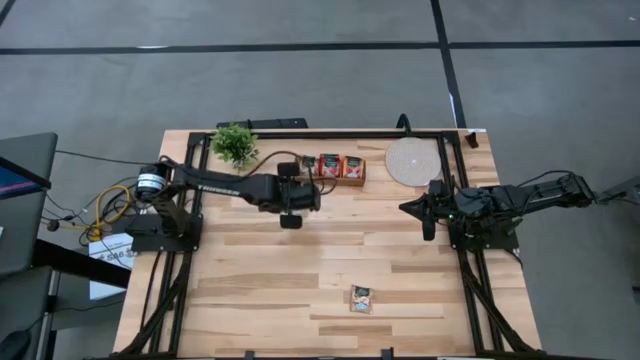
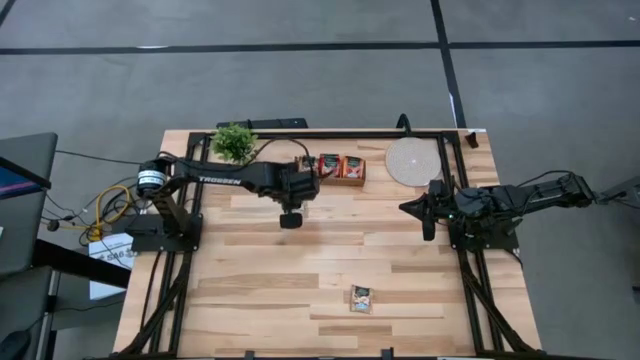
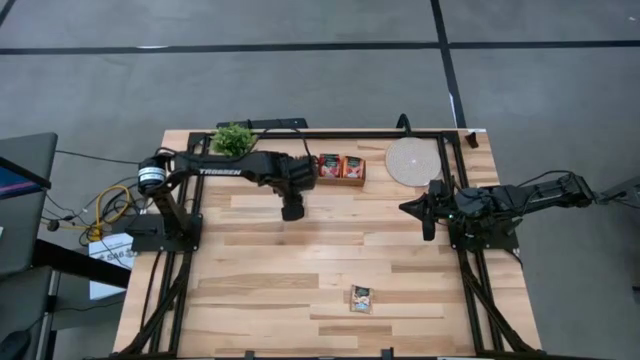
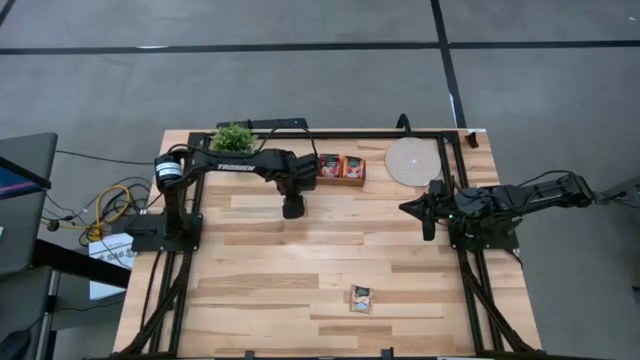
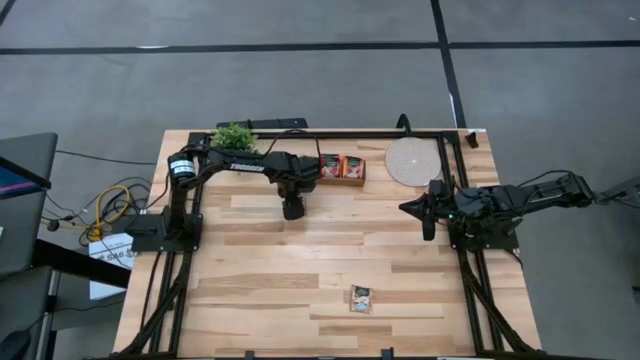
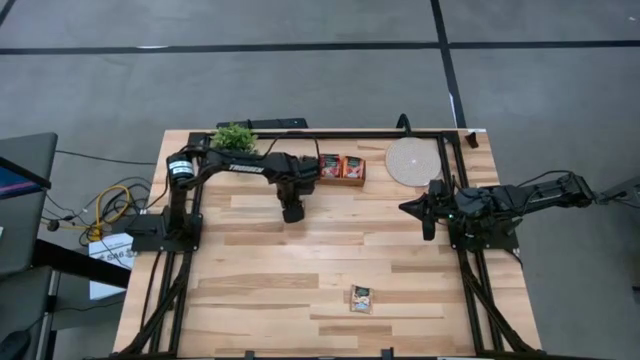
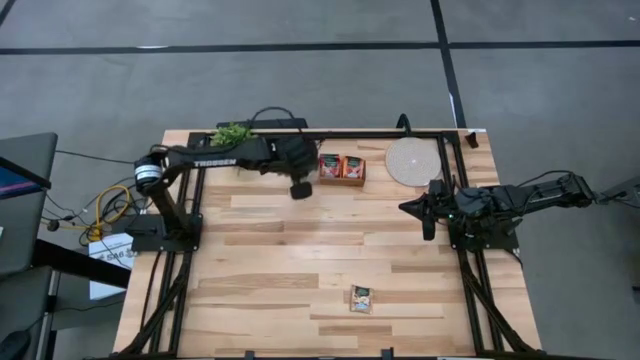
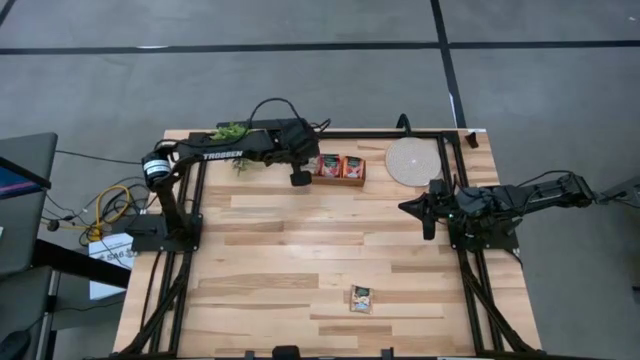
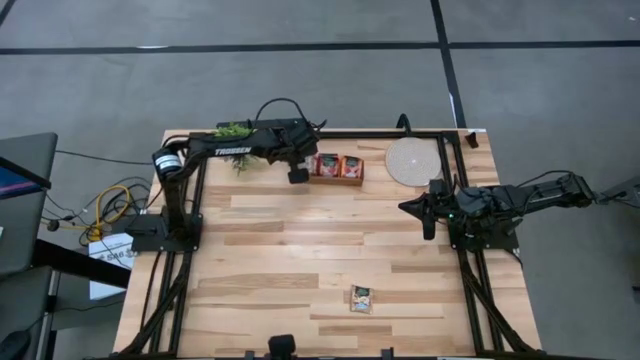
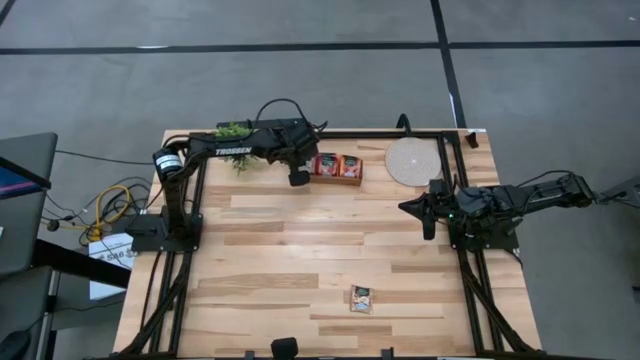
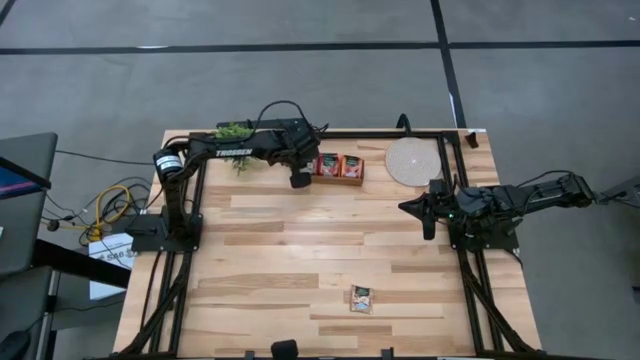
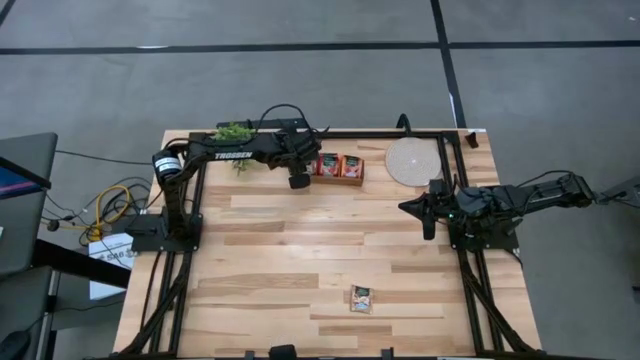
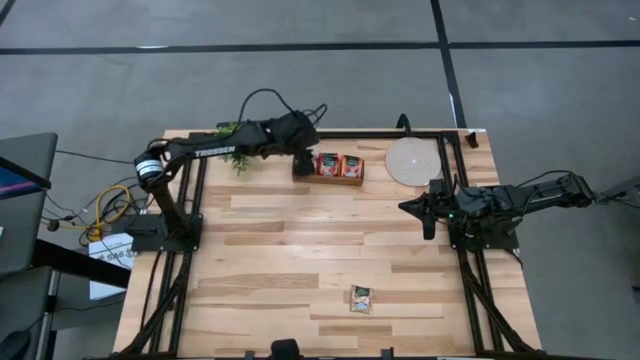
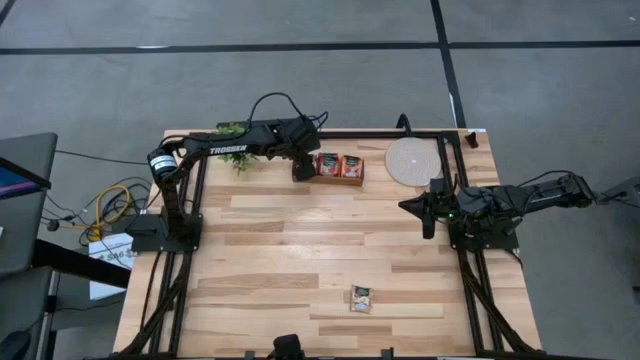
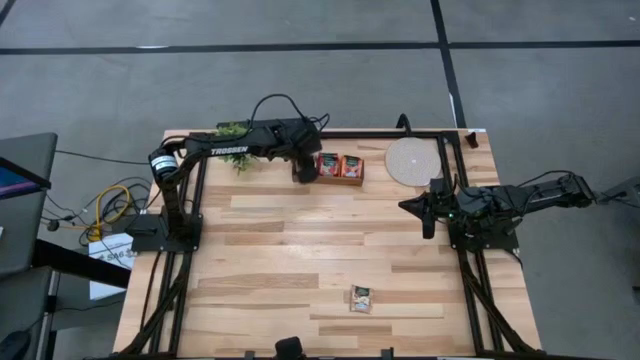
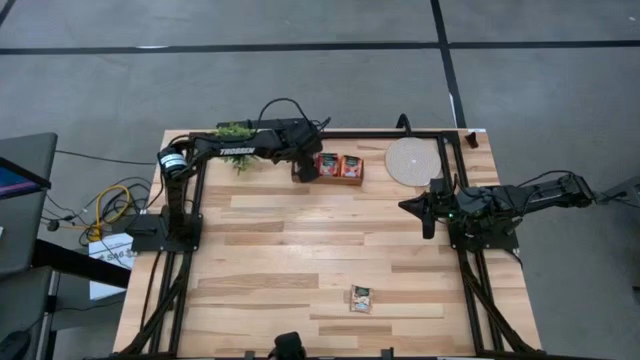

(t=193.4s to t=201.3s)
Task: Pick & Place Tea
Put the brown tea bag into the left section of the wooden organizer

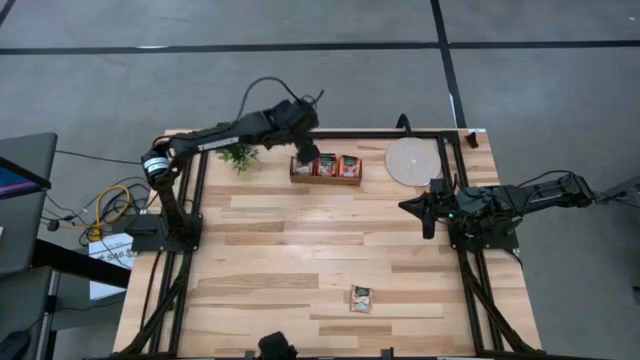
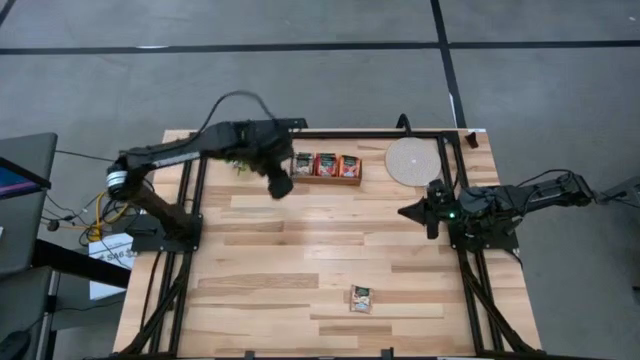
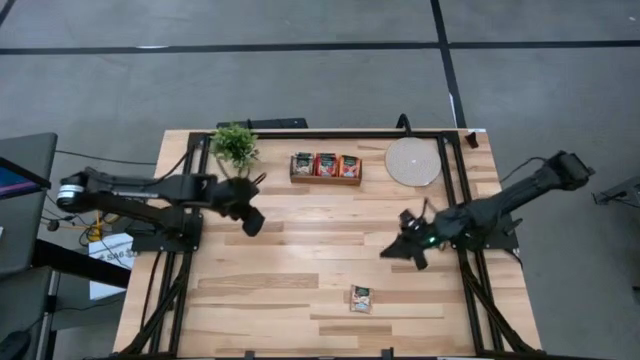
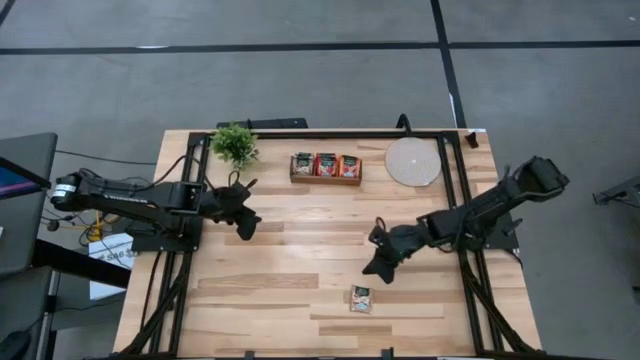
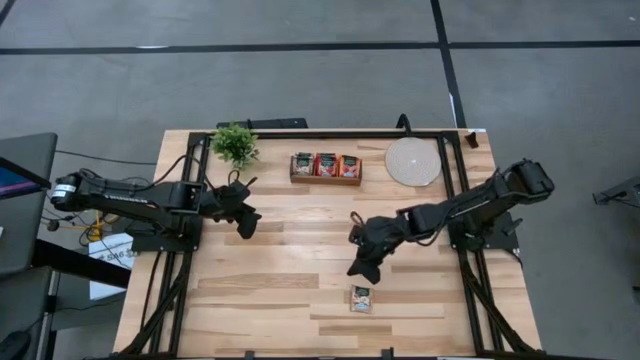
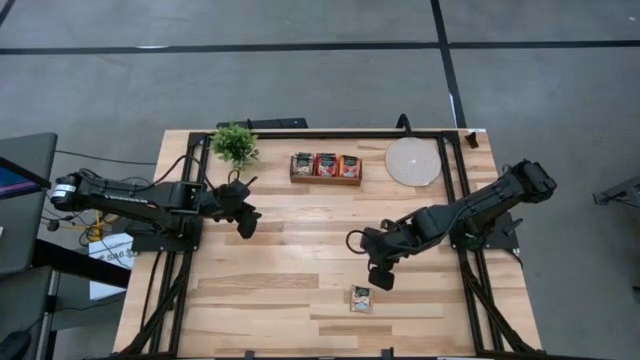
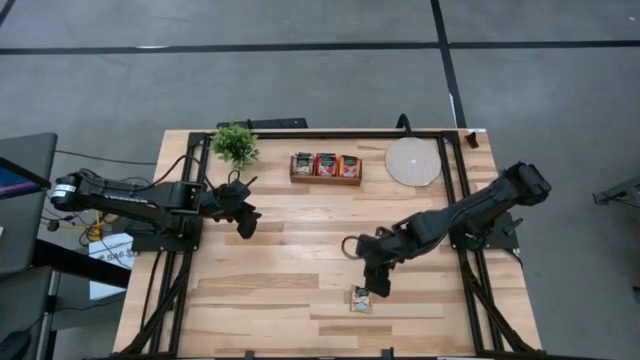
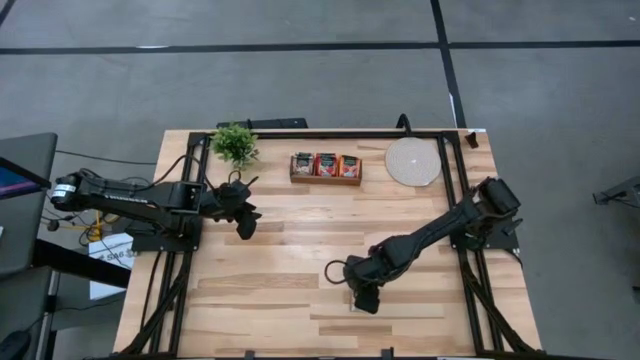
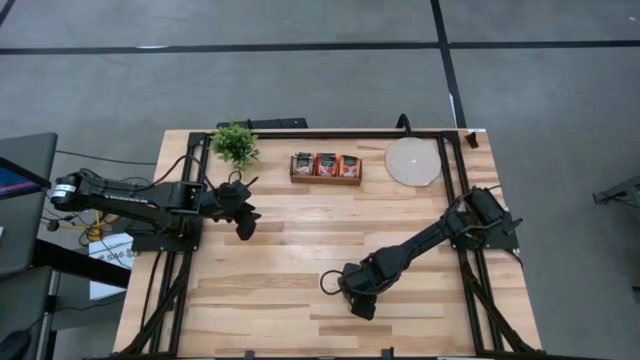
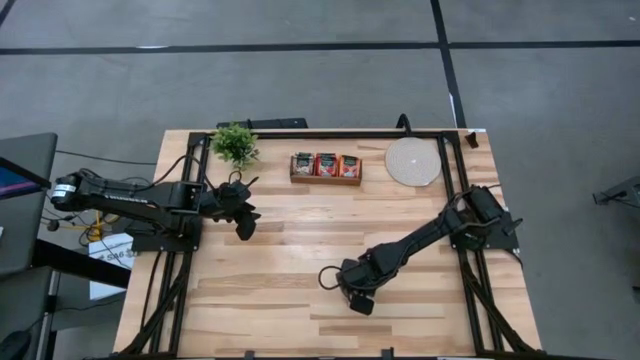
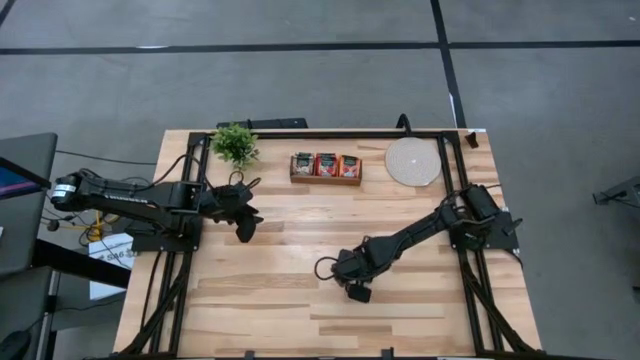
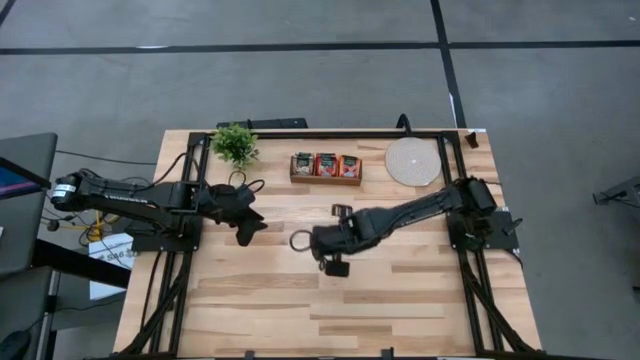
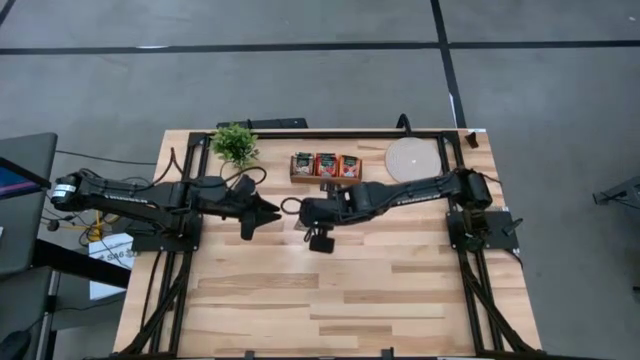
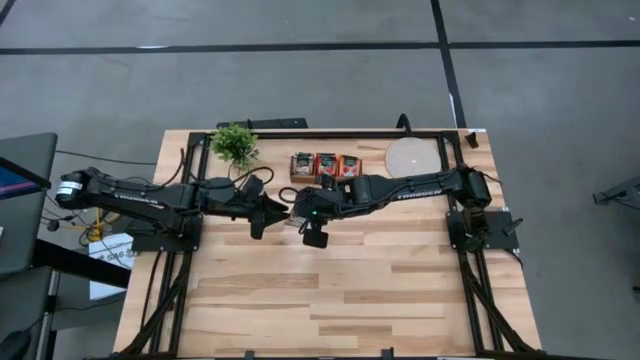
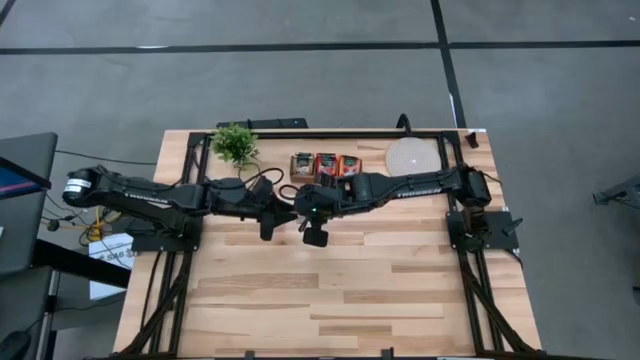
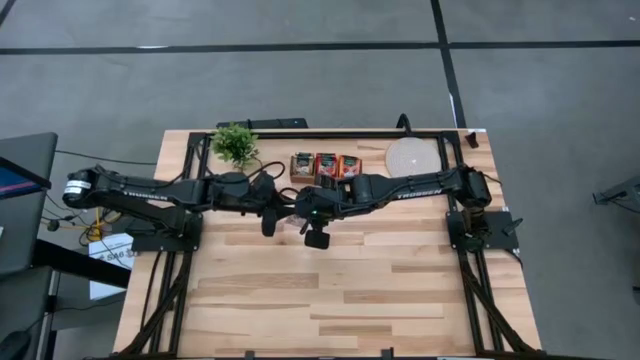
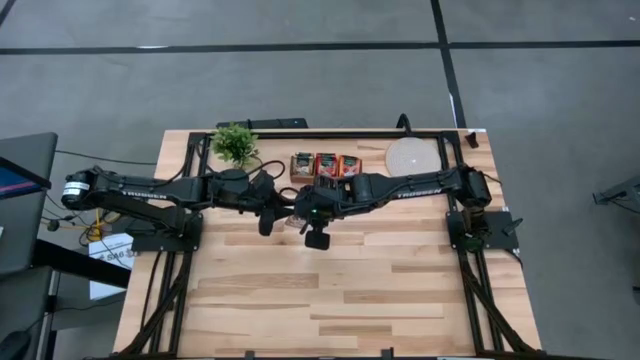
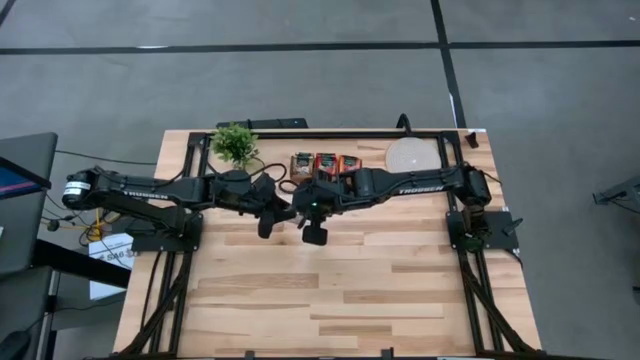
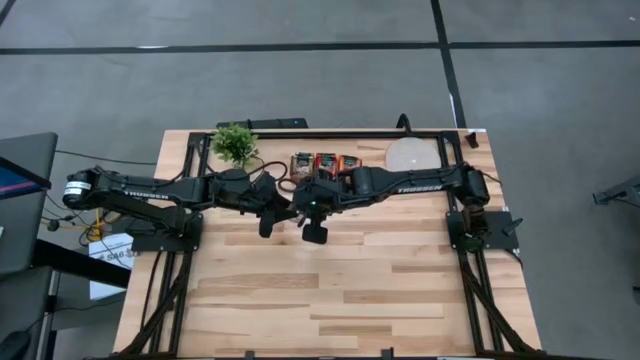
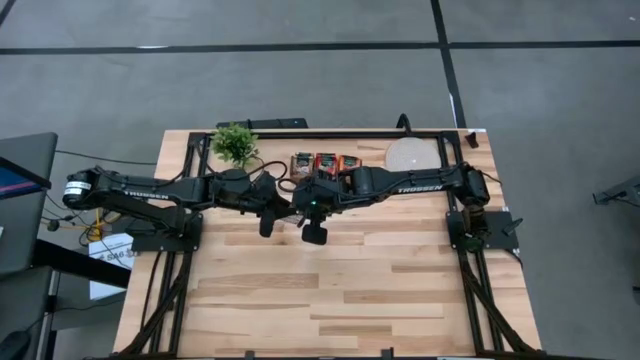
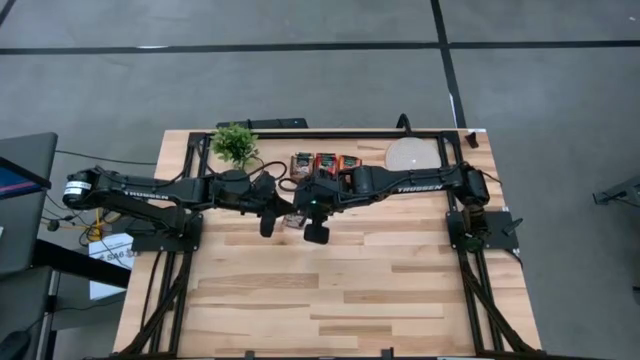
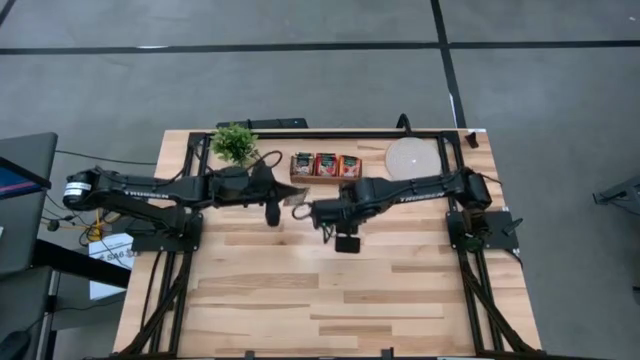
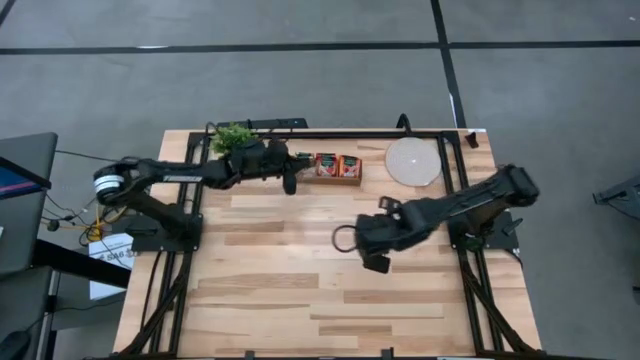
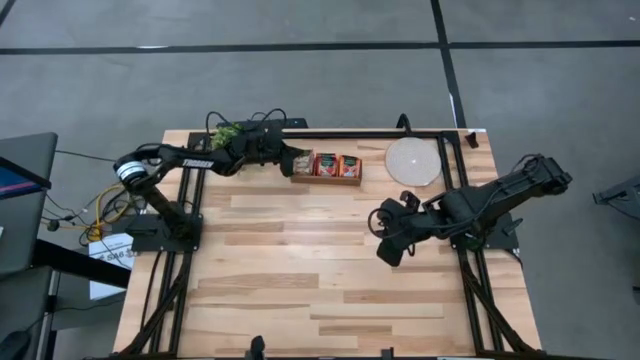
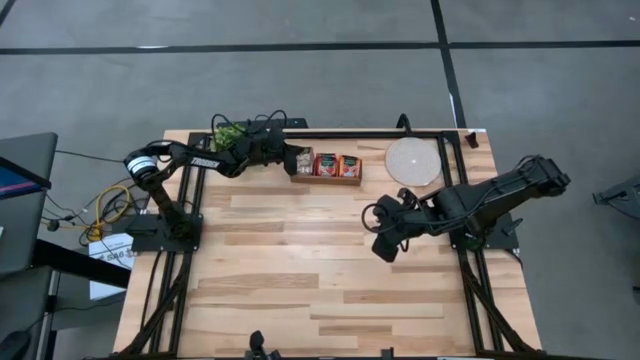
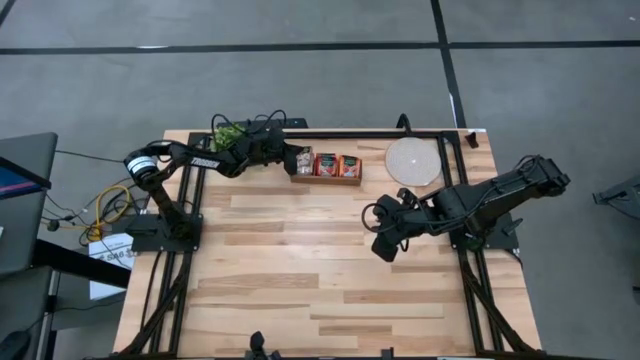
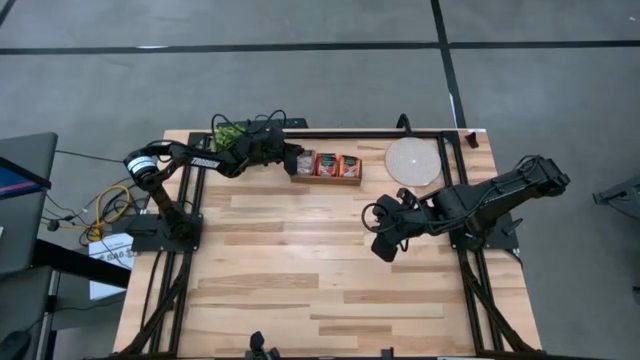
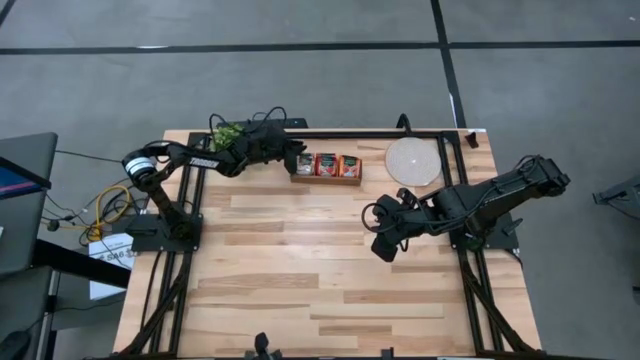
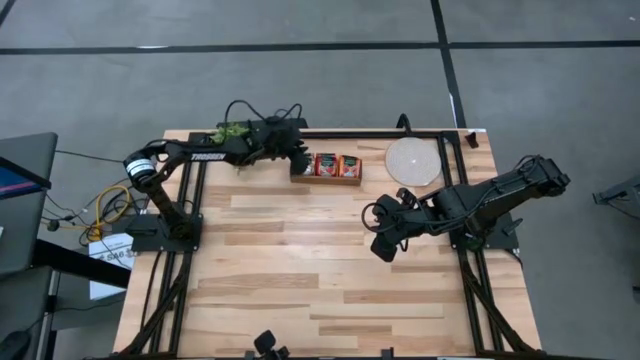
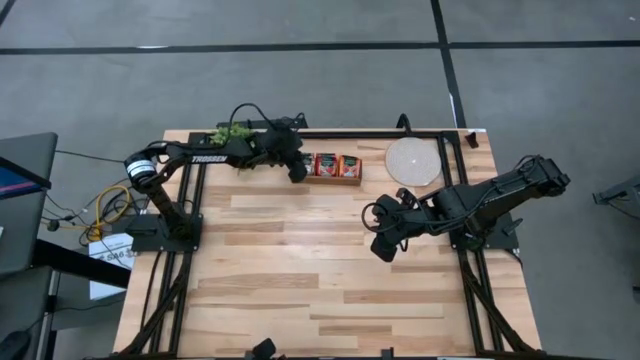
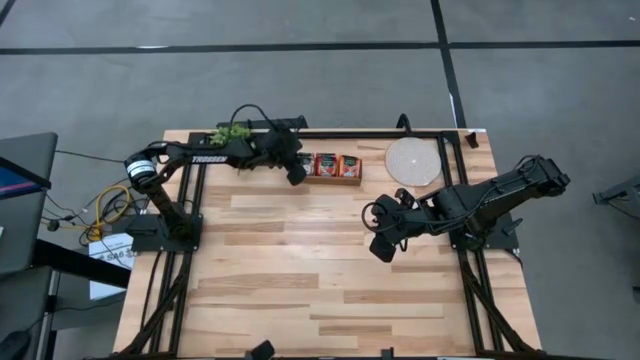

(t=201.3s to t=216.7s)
Put the brown tea bag into the left section of the wooden organizer
